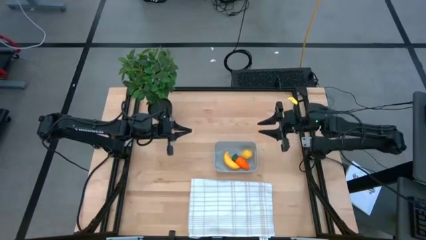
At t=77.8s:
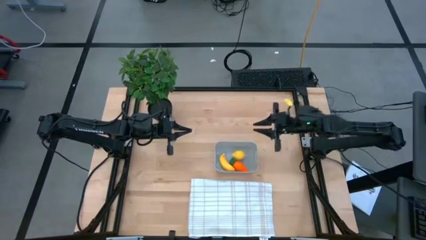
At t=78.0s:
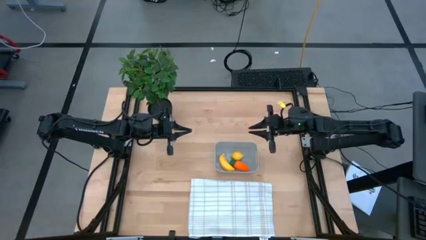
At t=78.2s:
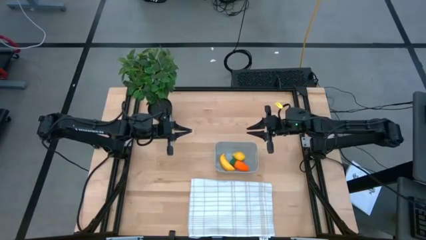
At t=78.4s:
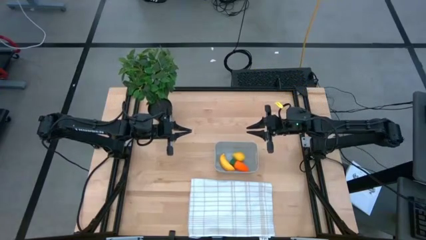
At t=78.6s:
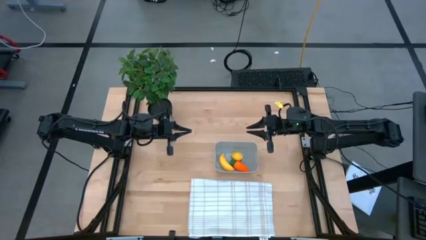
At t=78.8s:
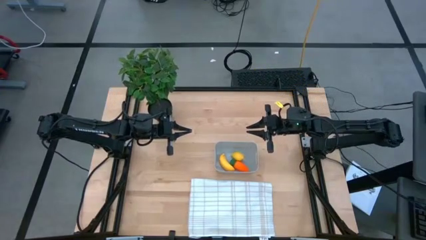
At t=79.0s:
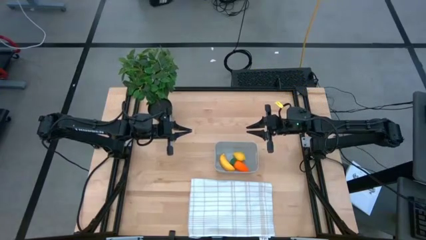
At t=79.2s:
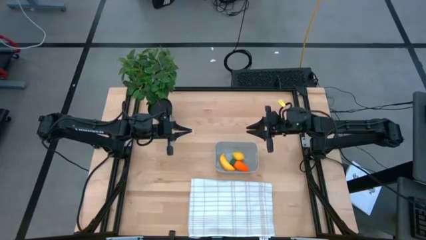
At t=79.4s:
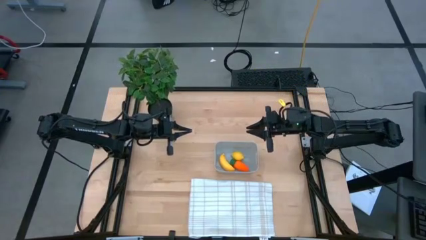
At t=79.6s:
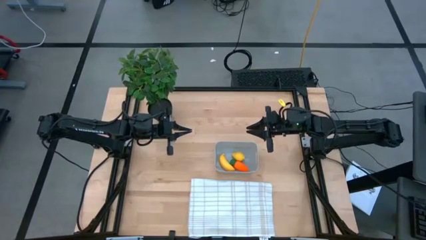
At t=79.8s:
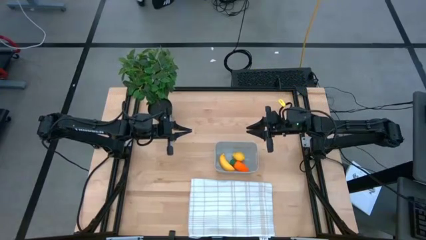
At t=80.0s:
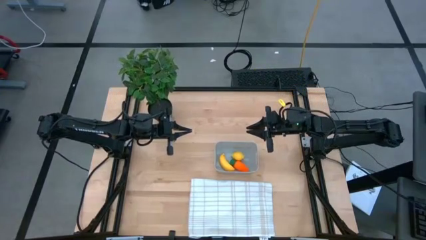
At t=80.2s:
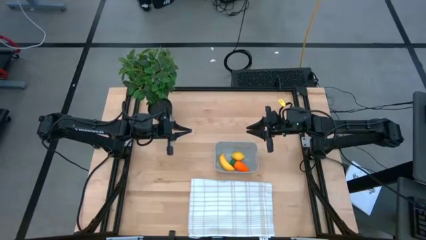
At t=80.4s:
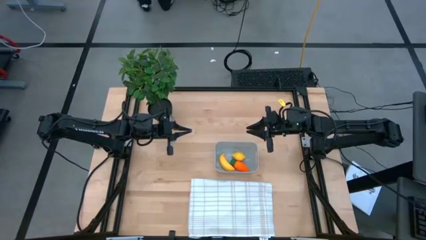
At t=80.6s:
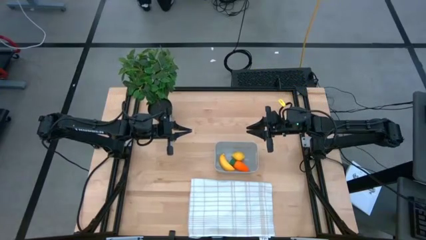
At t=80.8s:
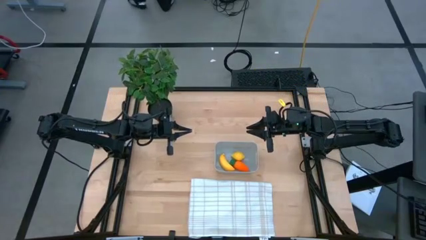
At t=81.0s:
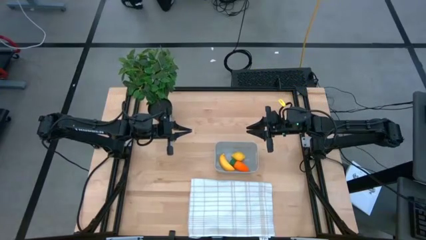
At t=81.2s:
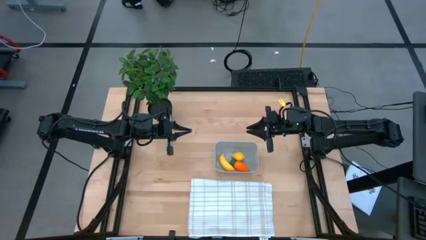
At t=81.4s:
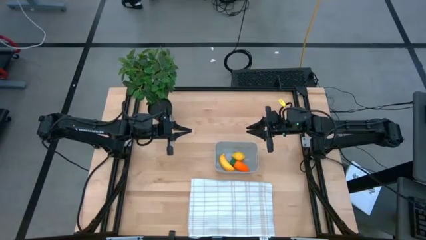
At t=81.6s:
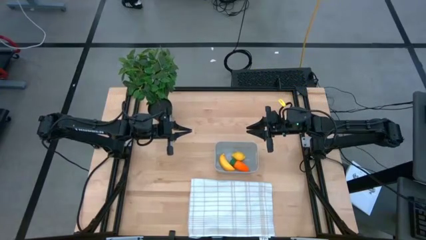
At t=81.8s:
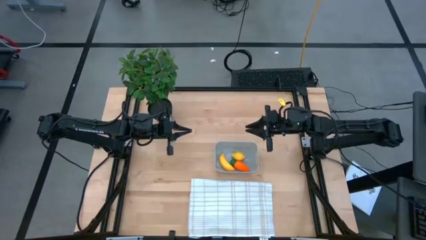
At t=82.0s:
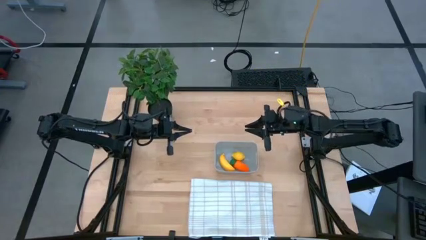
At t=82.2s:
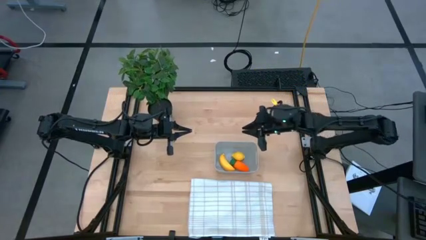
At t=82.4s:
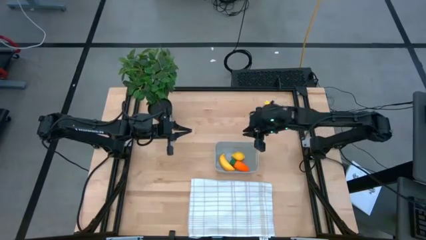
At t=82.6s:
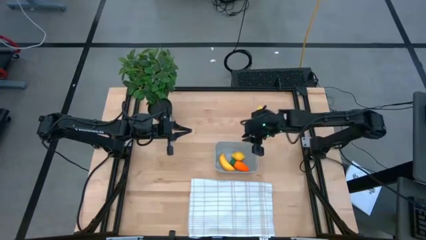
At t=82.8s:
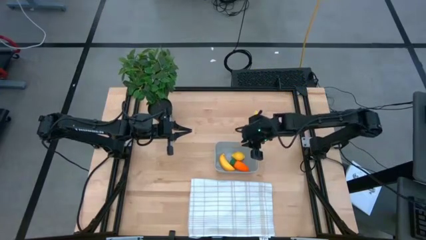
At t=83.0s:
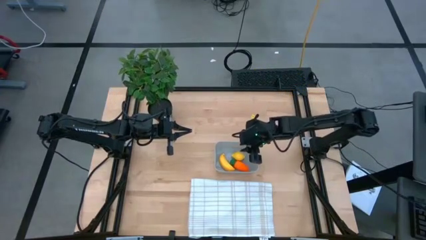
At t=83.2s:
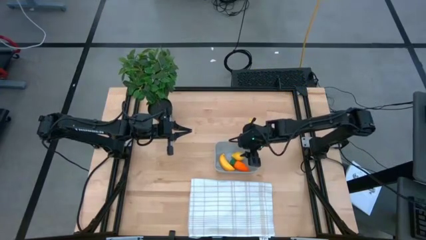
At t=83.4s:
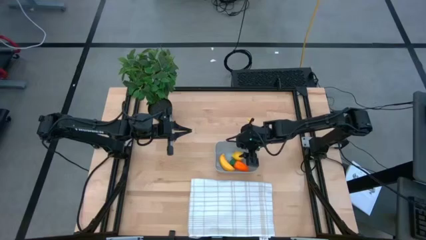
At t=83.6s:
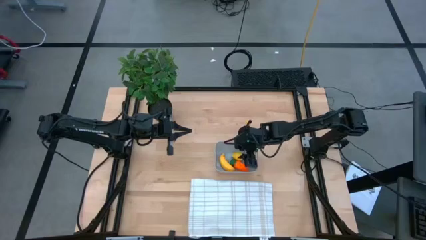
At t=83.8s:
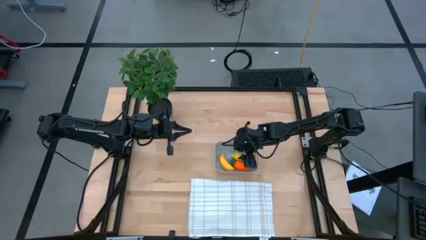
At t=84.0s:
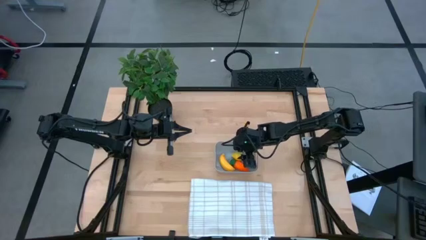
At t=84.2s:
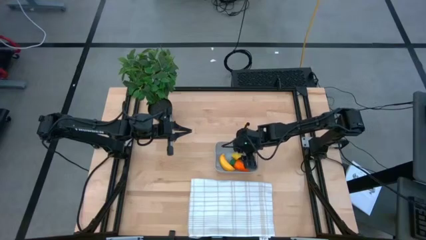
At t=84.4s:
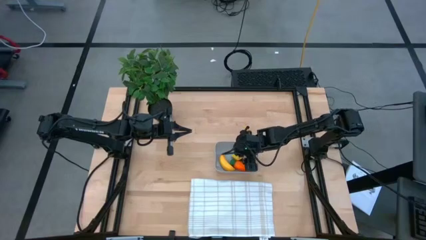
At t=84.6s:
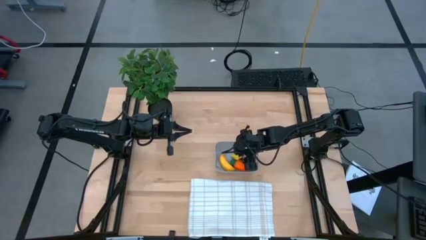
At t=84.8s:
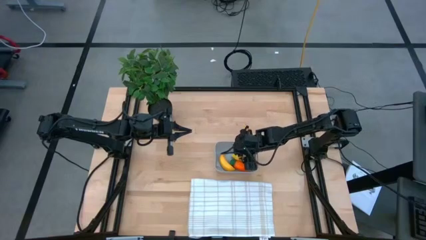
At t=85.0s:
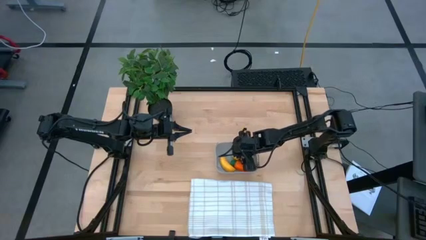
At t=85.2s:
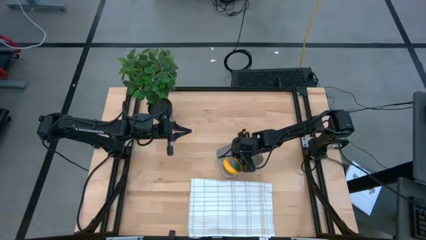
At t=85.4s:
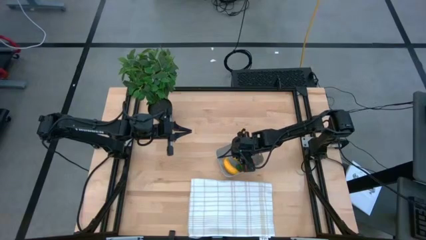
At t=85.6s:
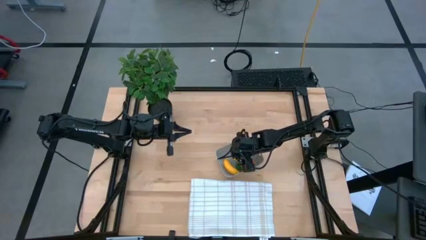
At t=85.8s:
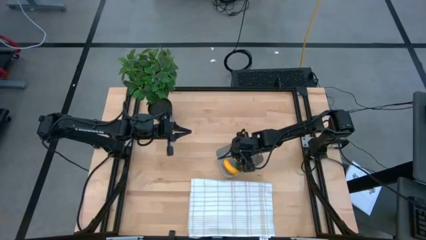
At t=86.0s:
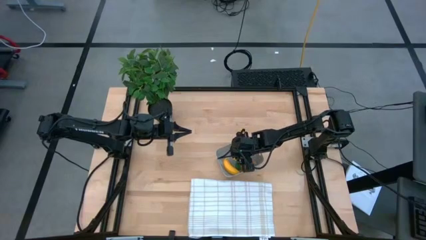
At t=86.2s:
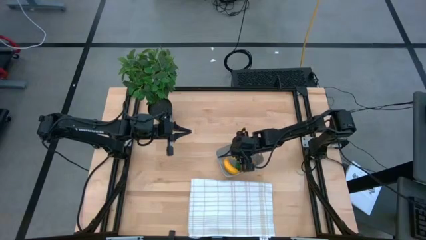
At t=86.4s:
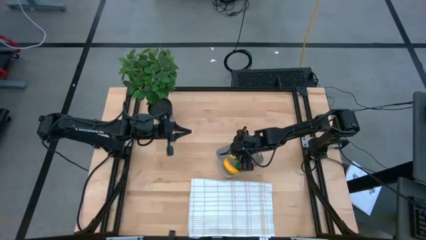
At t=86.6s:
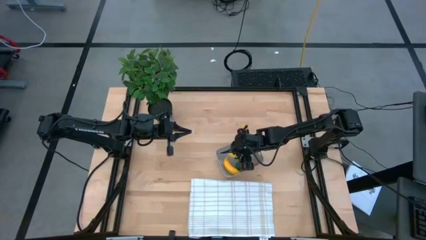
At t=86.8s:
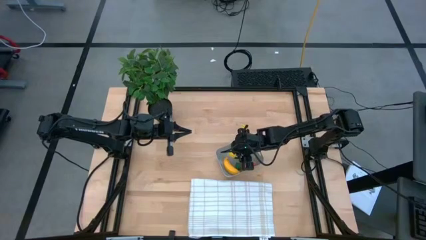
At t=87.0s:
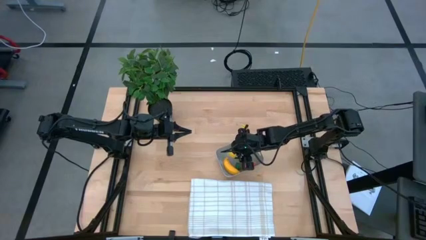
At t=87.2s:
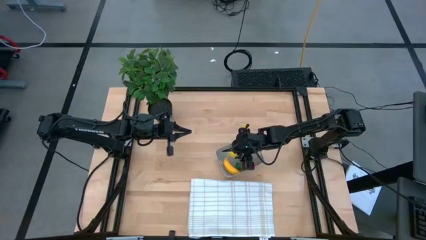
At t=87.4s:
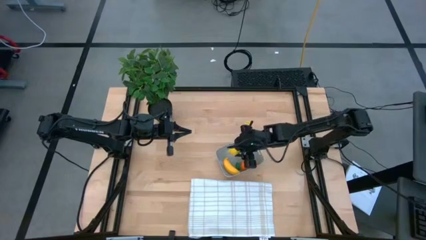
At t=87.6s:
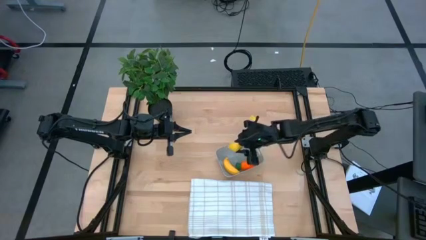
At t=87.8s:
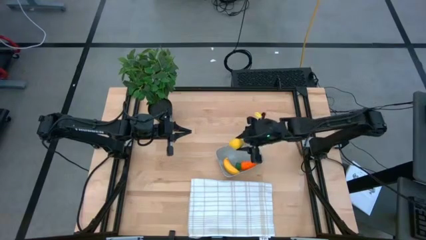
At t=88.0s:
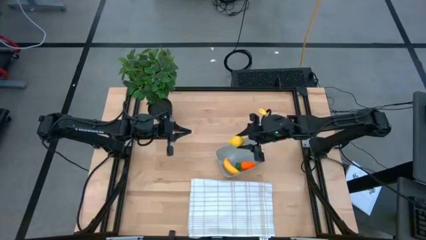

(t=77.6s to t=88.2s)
Task: Pick and placing Produce into tupperware
Adjust the yellow lemon in the gray bin

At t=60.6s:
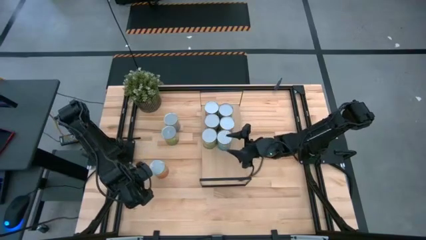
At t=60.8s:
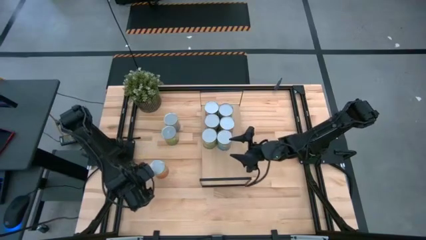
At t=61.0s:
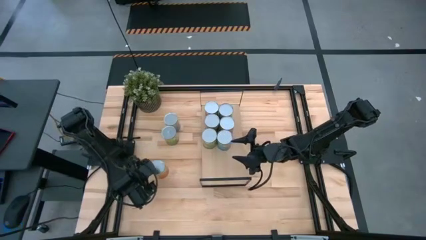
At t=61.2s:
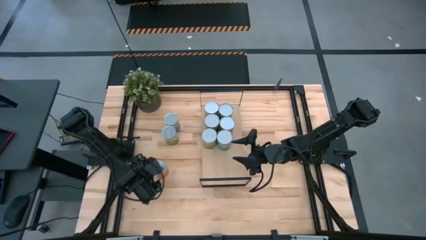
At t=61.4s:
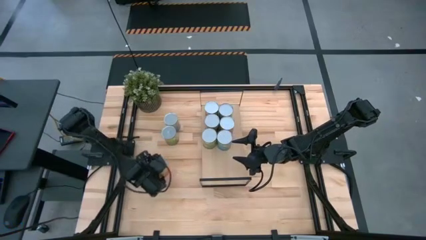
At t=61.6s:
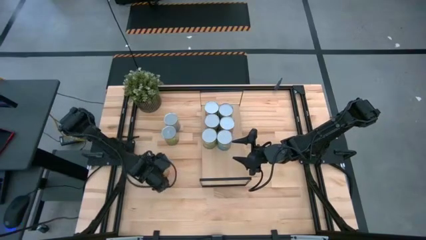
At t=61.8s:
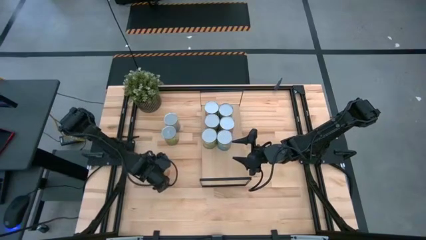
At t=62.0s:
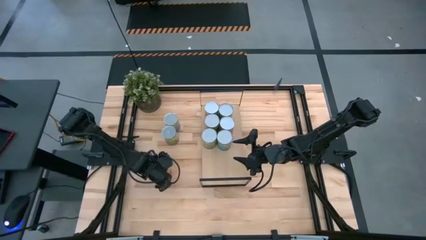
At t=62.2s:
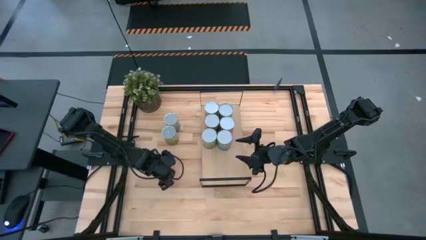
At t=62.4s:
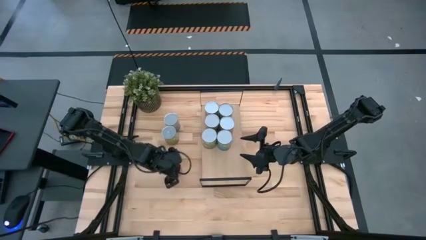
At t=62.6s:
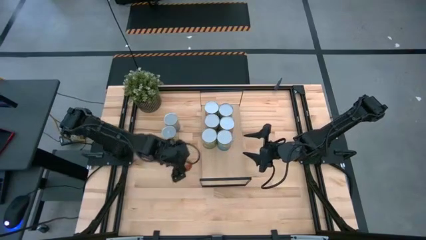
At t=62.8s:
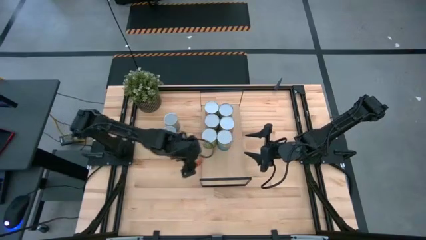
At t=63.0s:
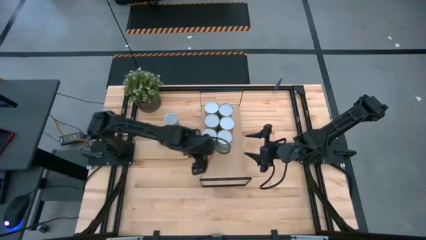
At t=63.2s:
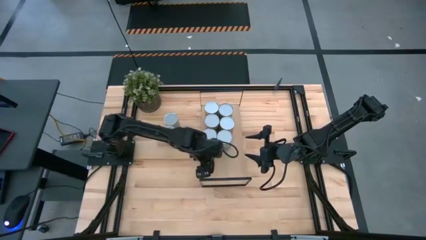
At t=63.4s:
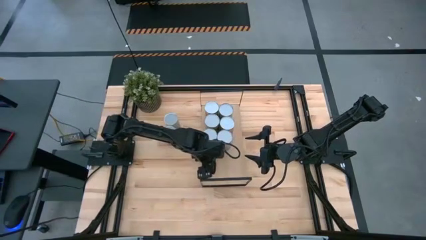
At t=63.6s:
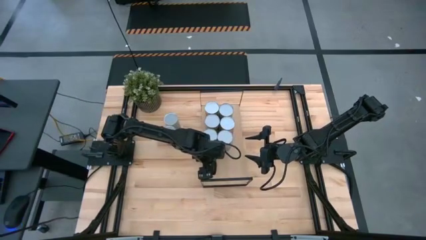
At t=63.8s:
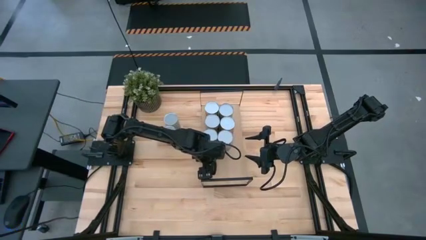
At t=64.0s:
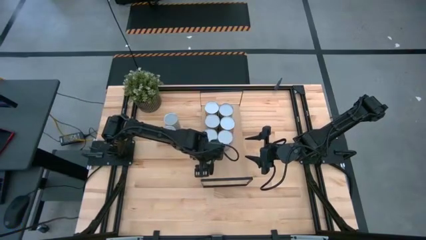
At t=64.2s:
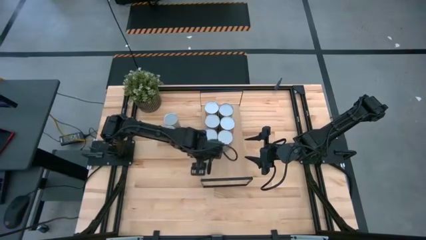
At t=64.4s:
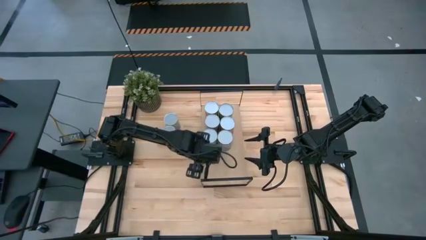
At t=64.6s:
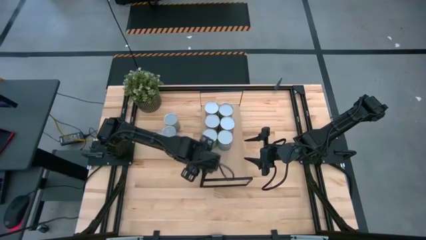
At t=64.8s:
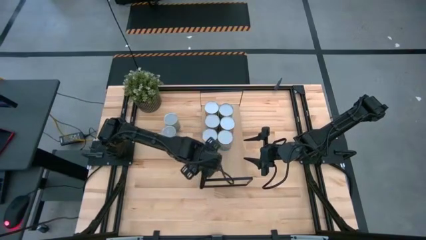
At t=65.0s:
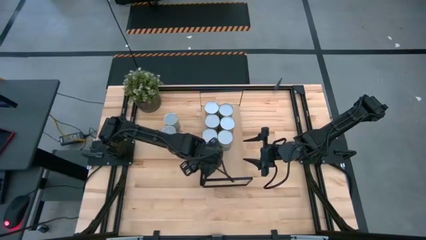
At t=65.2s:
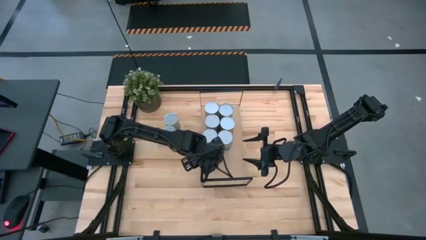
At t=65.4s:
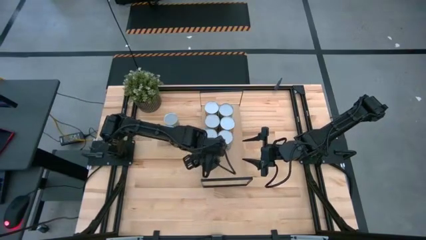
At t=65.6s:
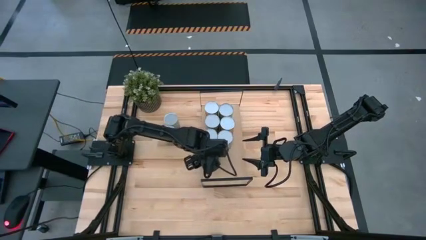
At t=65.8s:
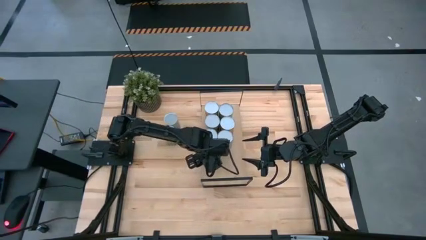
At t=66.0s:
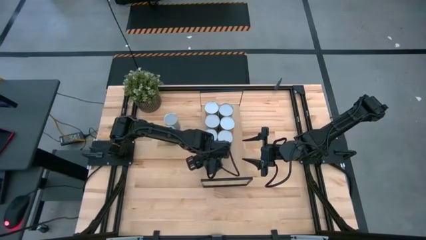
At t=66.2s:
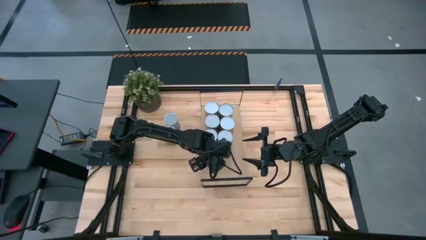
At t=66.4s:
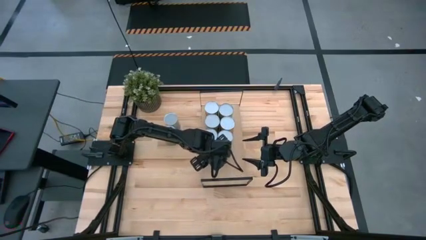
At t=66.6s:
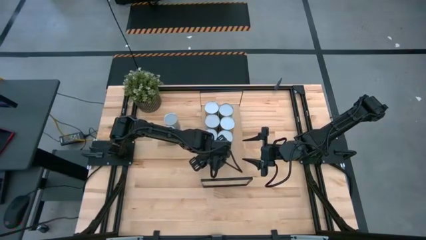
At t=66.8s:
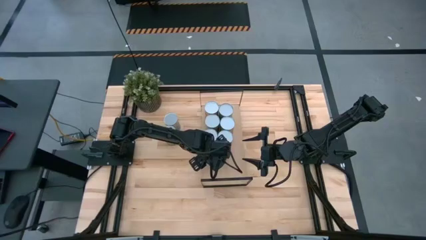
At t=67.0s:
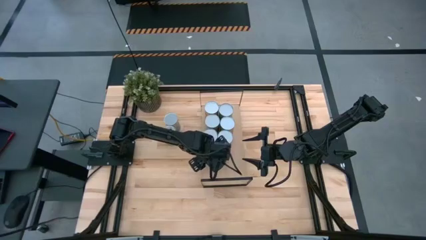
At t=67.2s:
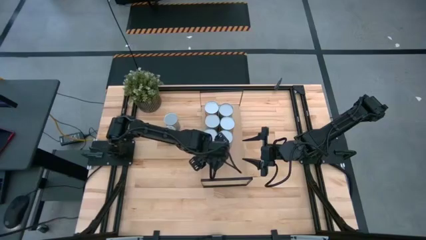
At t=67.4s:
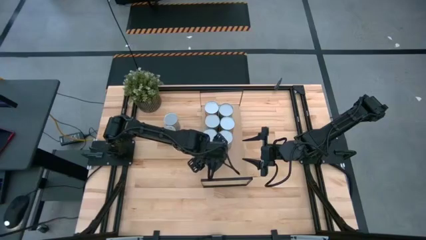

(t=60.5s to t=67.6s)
Task: Pick and place cans onto a shelf
Put the canned pineapple on the shelf
